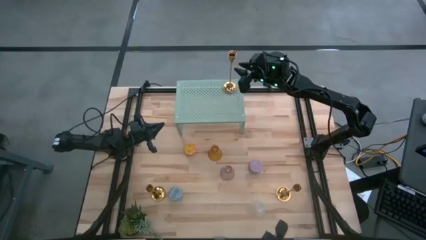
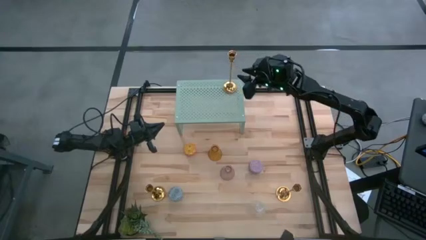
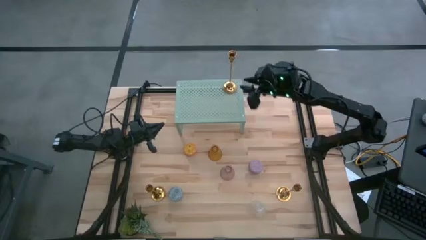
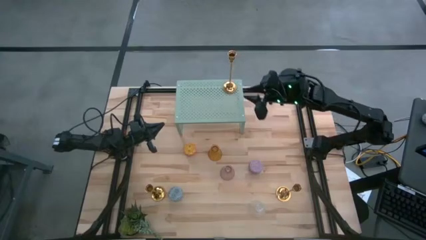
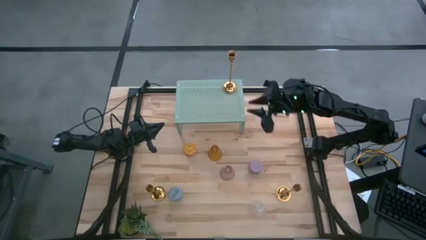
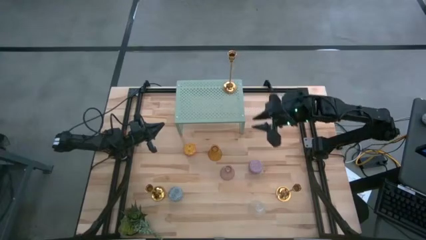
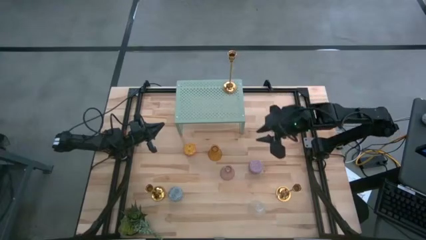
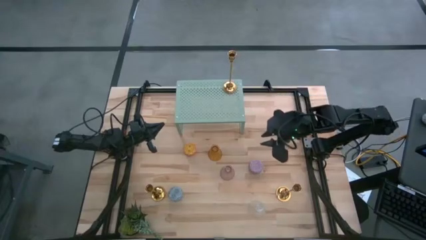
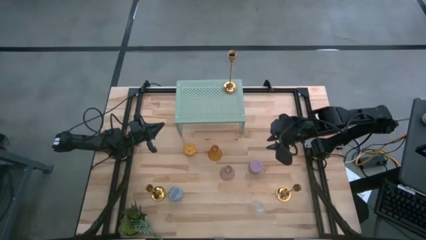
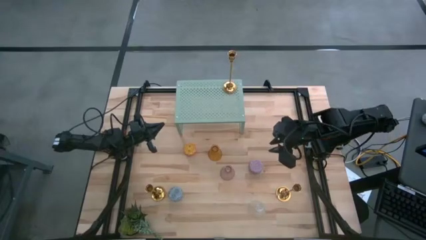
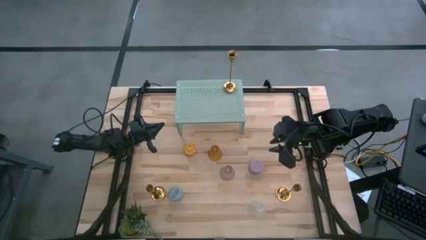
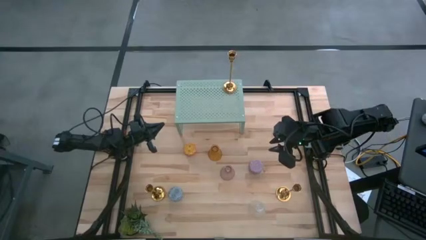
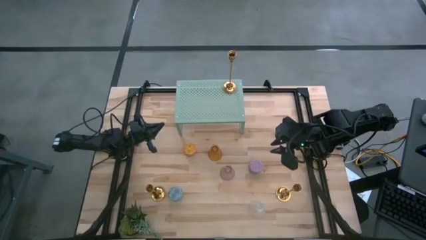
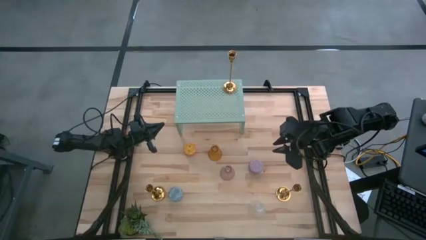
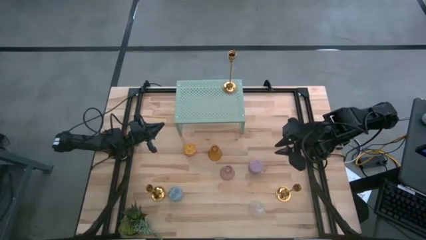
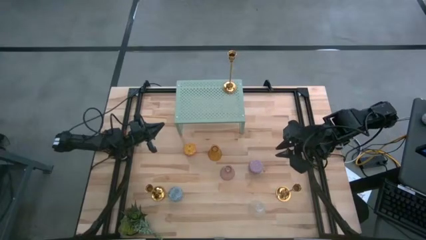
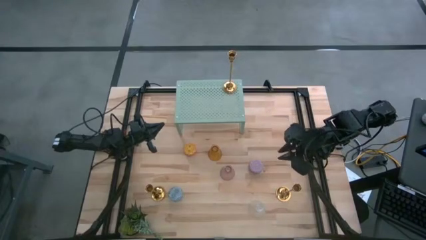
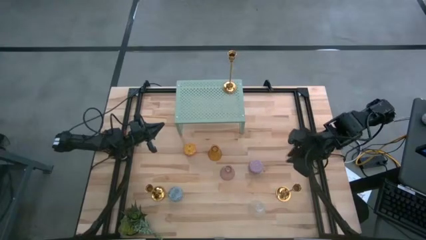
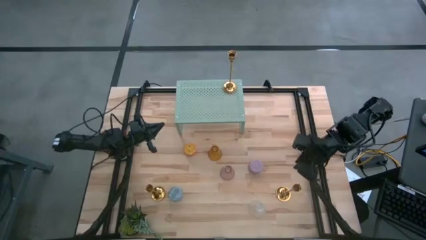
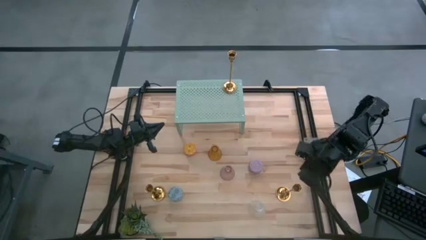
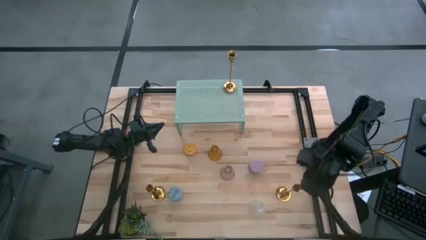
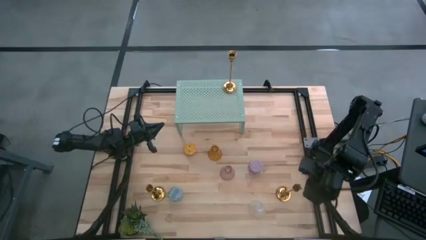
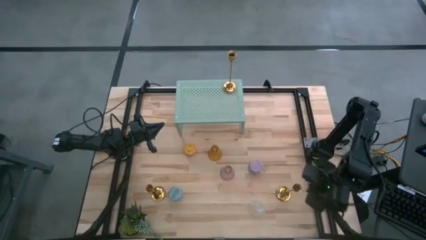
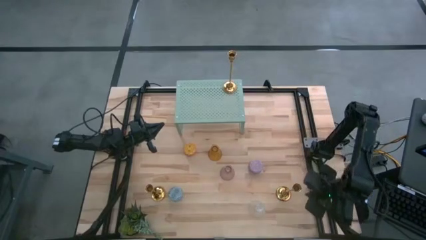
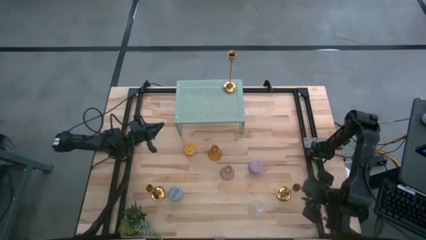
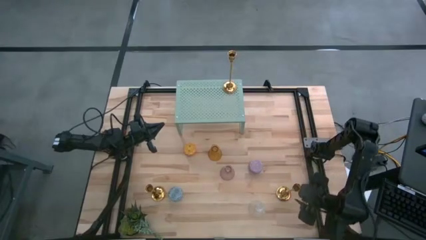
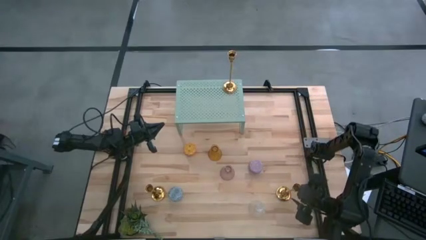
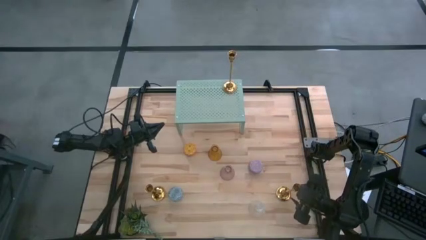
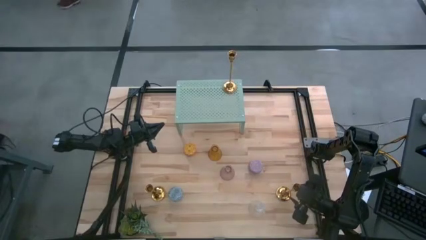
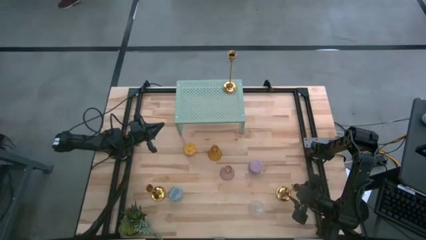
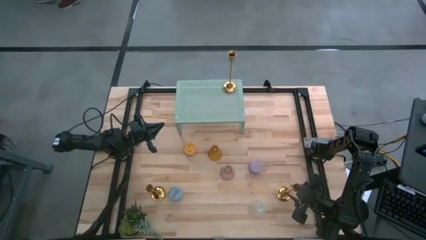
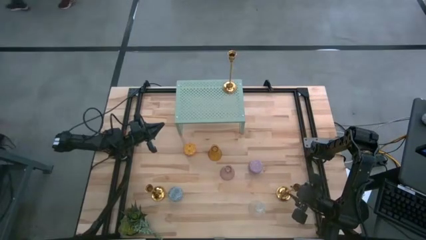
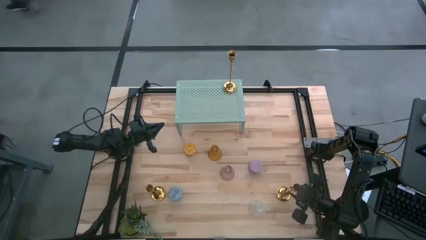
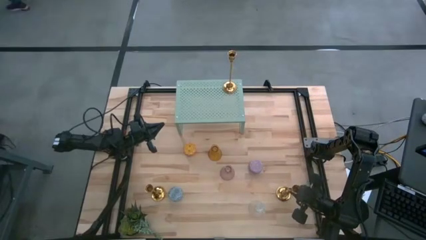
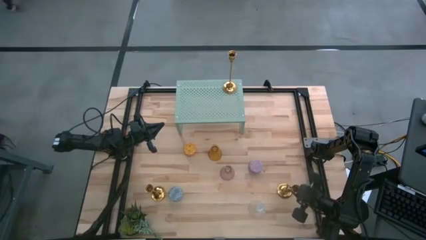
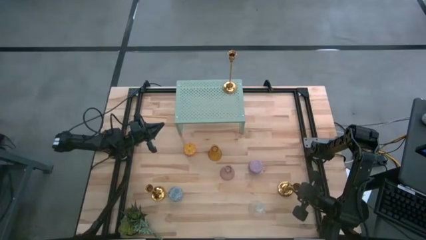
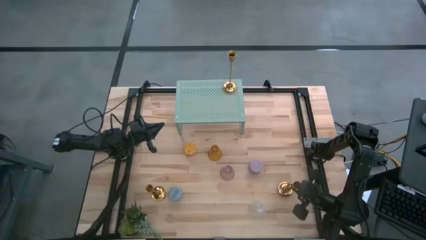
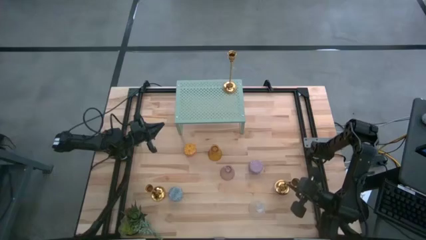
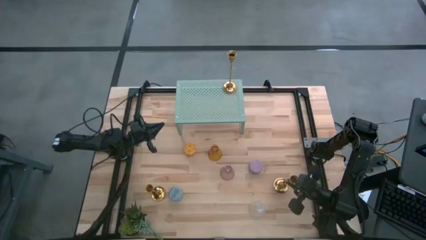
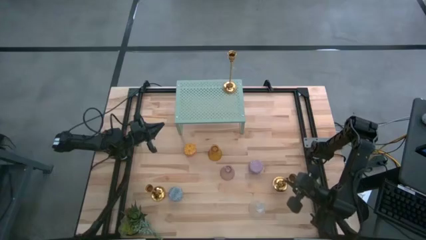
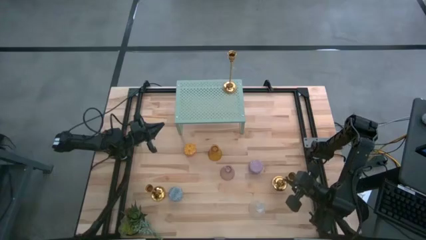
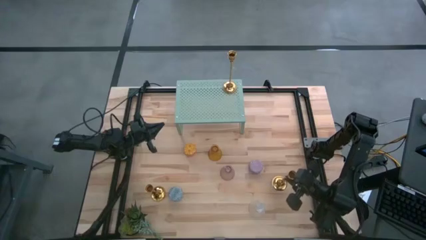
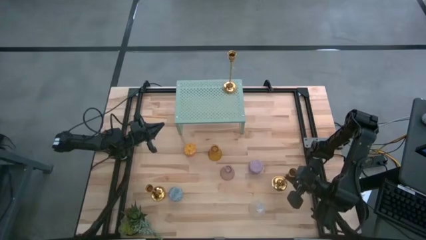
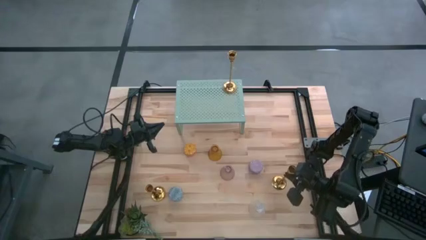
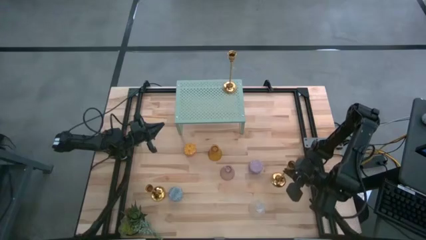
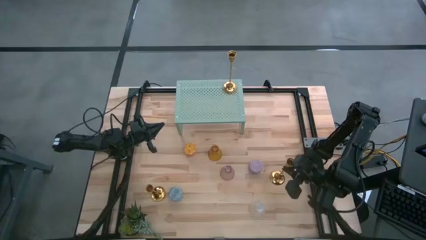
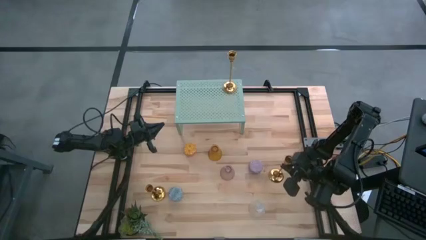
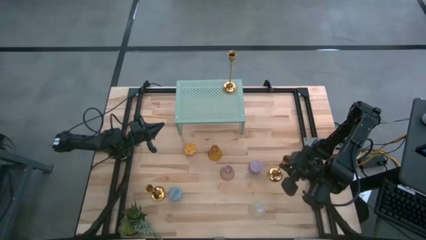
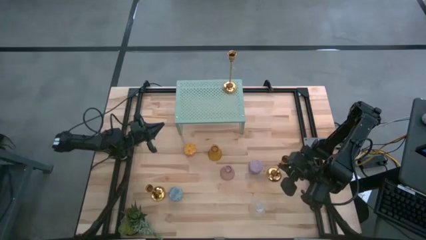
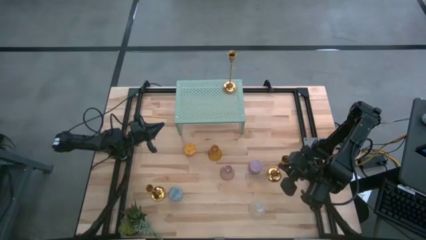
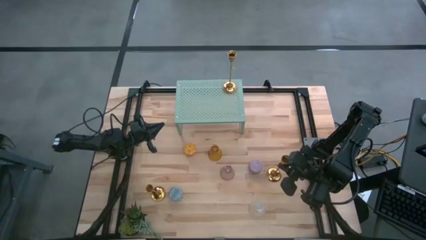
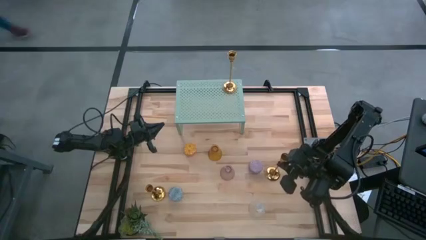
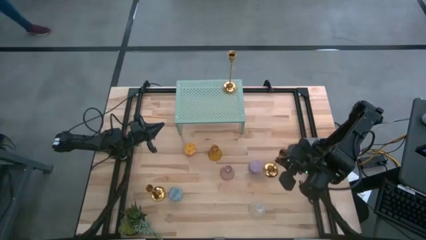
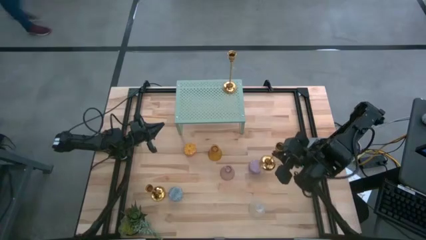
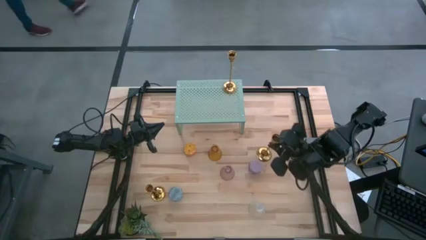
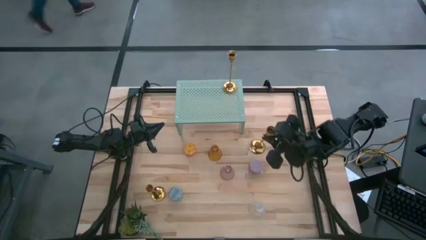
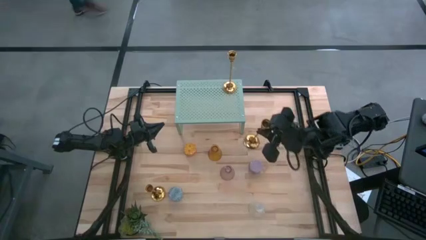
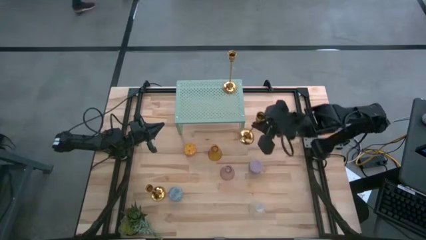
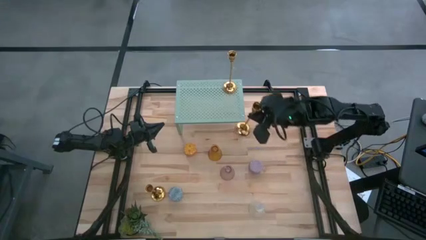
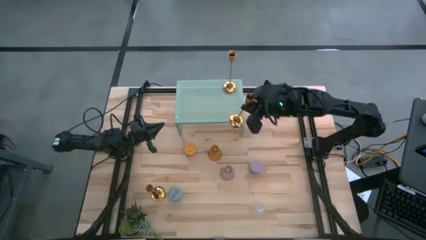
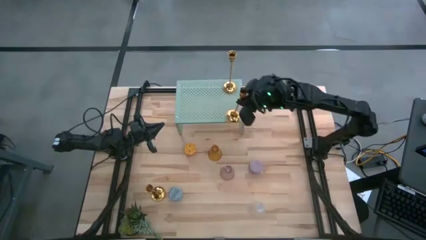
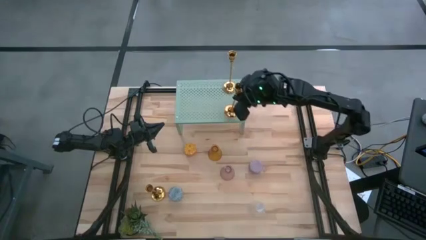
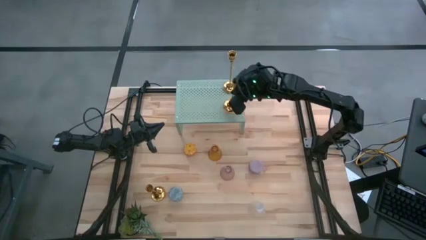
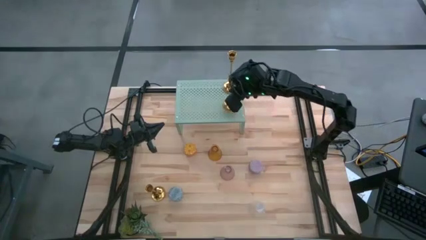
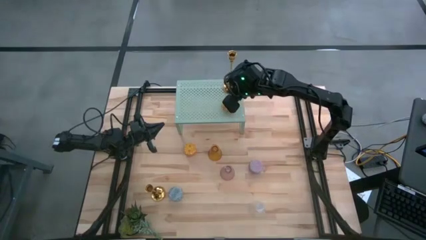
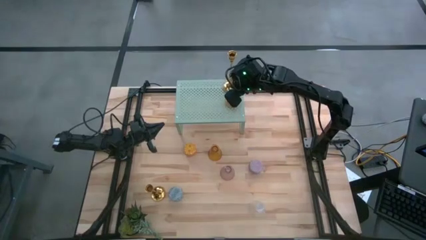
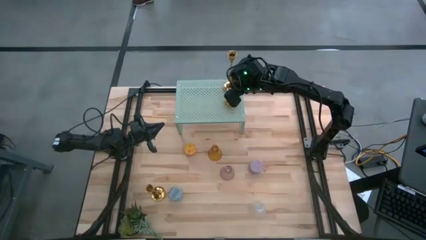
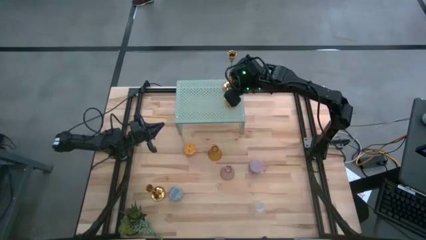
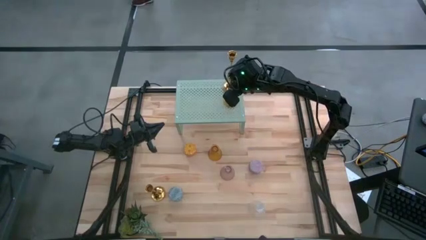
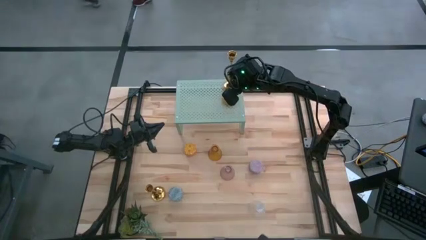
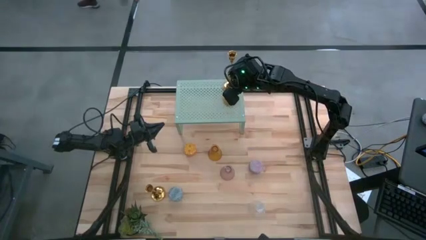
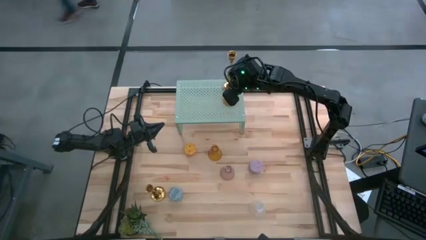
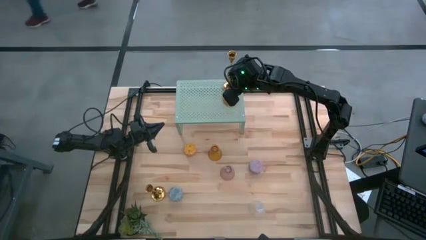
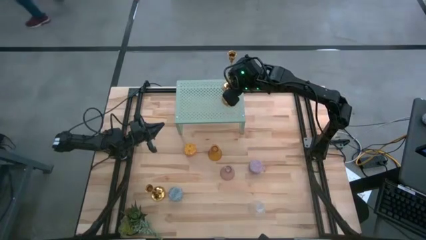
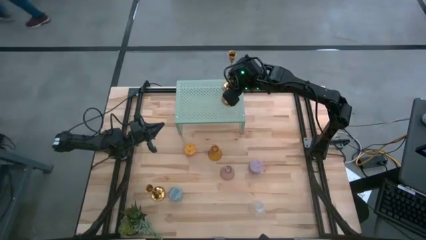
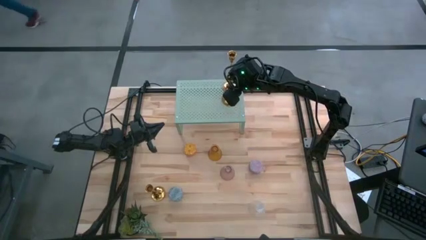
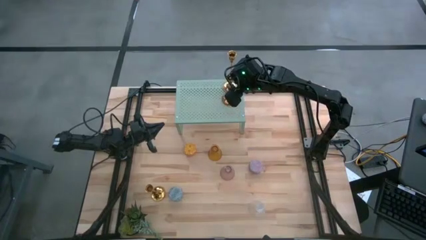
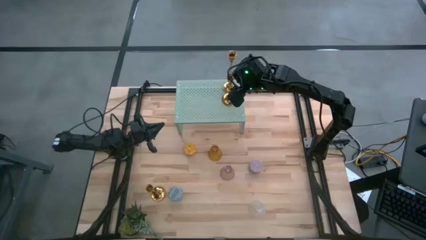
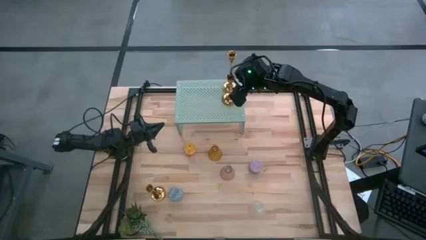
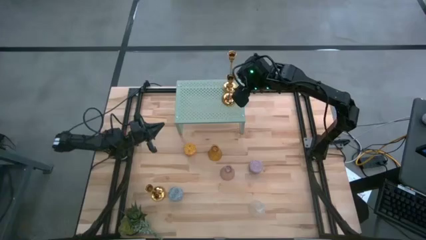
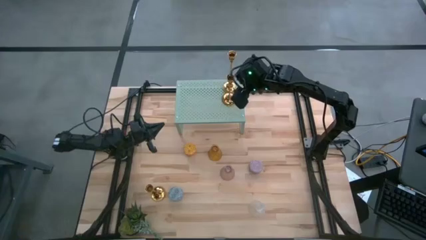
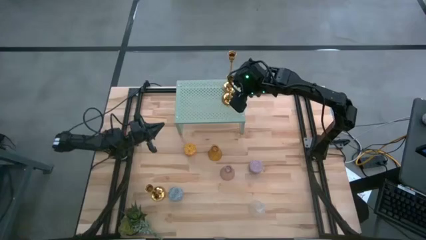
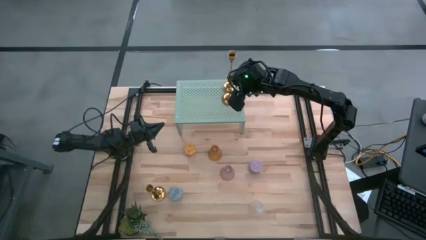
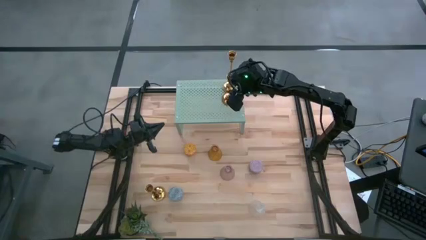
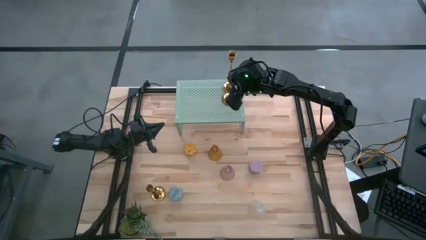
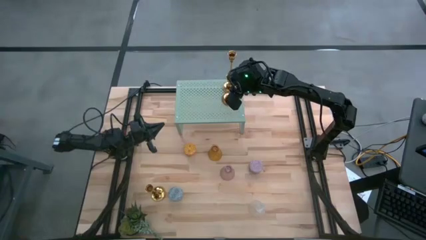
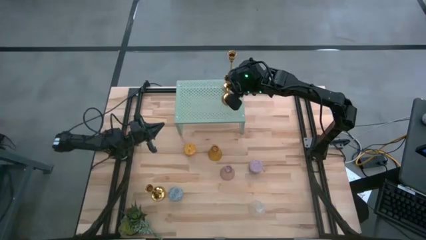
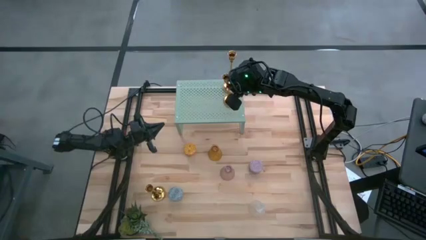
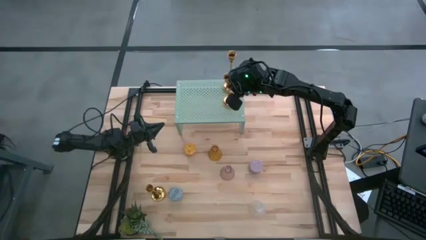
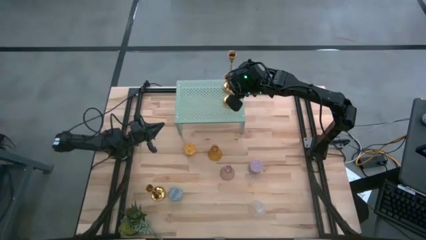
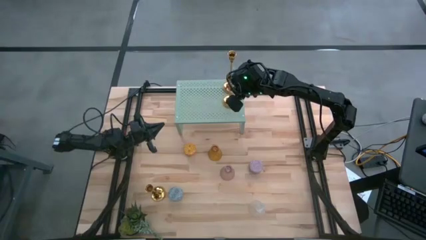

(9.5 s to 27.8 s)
Task: Pick & Place candle stick holders
Put the right gold candle holder on the shelf aligned with the other gold candle holder
